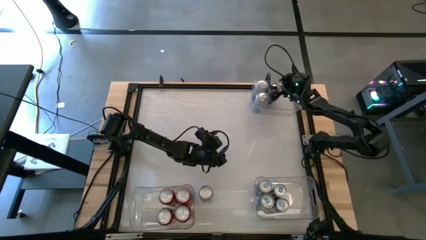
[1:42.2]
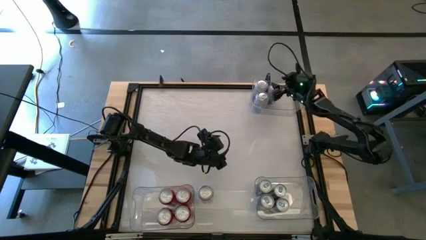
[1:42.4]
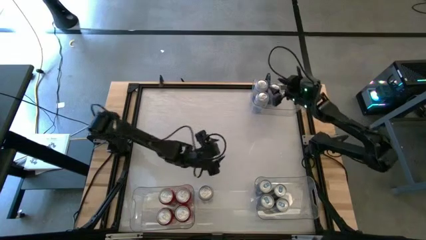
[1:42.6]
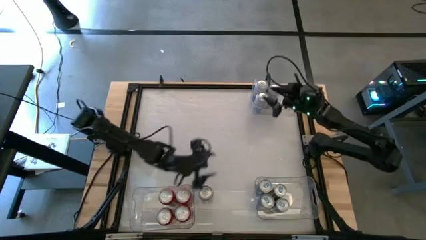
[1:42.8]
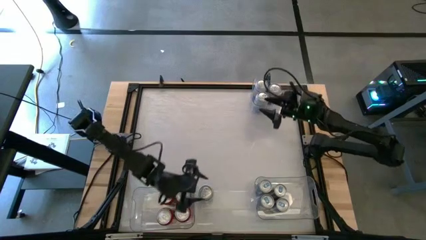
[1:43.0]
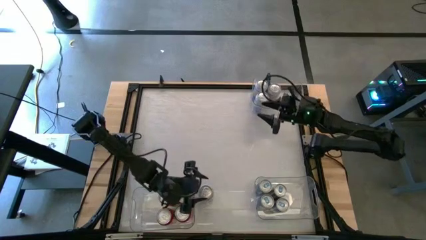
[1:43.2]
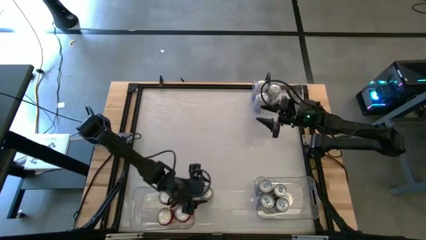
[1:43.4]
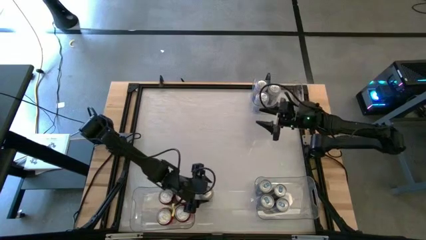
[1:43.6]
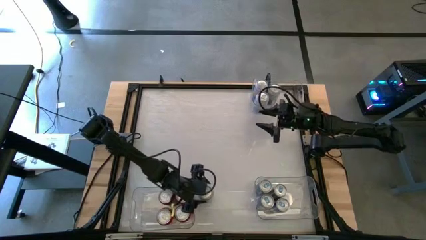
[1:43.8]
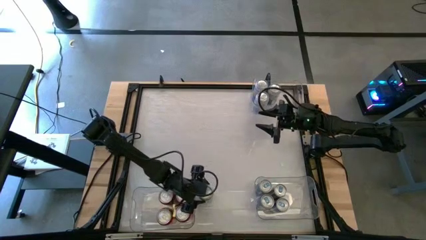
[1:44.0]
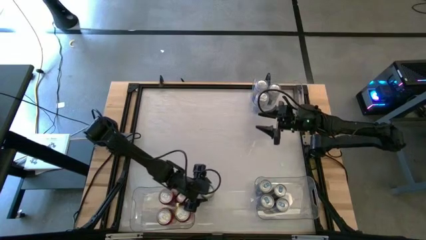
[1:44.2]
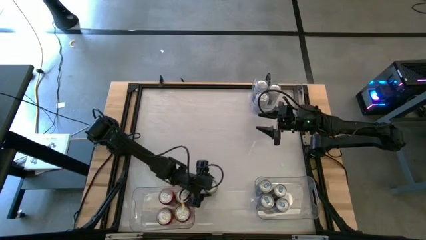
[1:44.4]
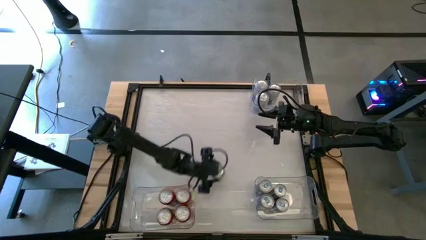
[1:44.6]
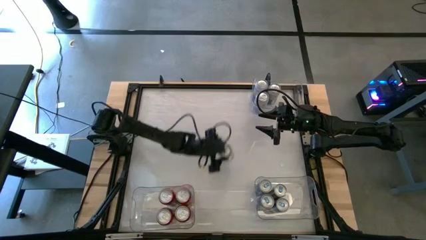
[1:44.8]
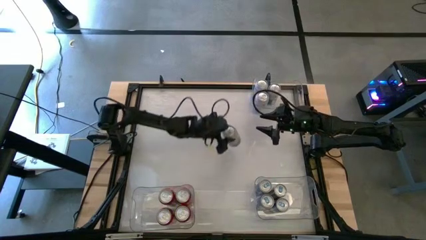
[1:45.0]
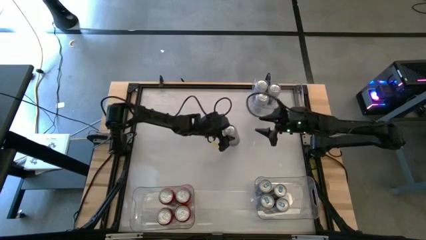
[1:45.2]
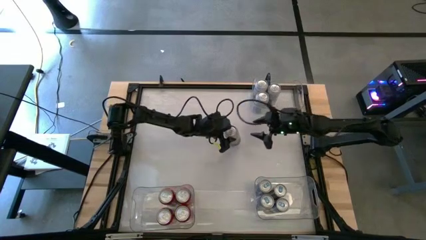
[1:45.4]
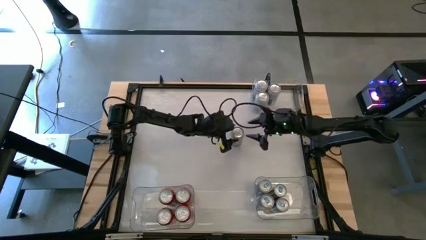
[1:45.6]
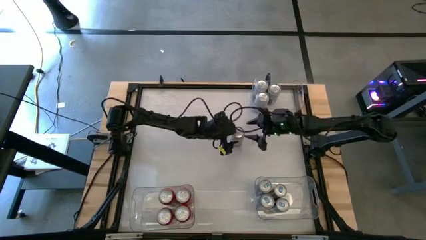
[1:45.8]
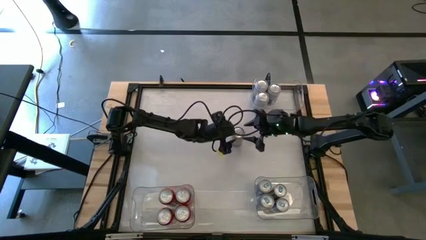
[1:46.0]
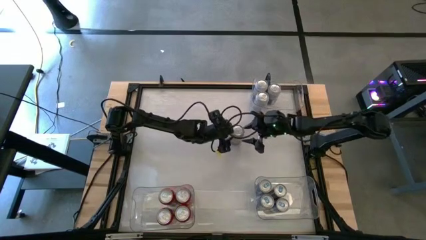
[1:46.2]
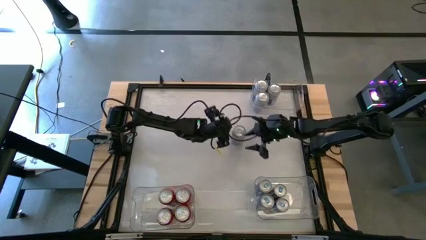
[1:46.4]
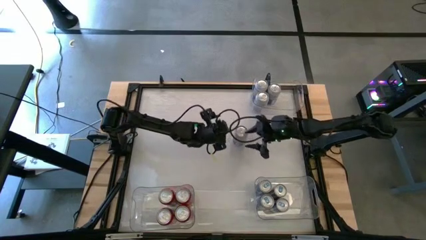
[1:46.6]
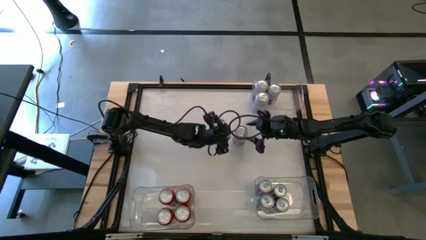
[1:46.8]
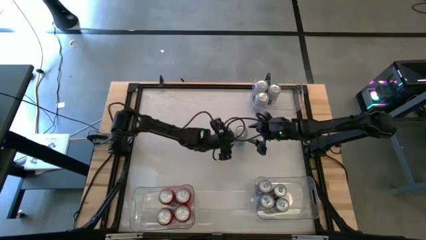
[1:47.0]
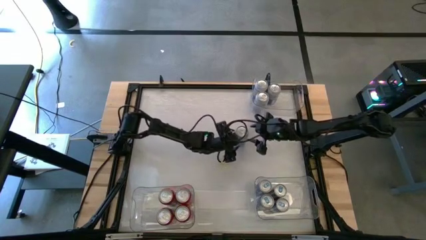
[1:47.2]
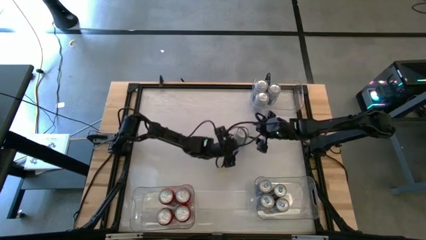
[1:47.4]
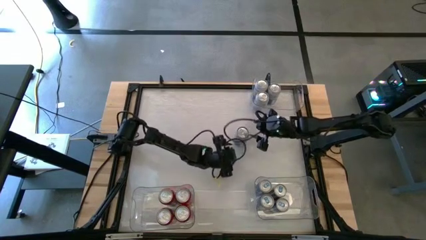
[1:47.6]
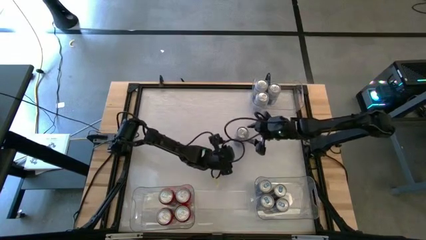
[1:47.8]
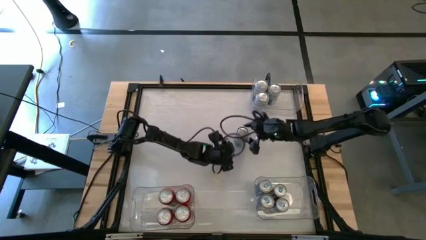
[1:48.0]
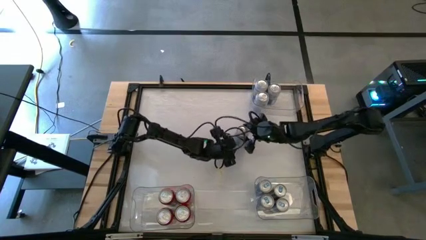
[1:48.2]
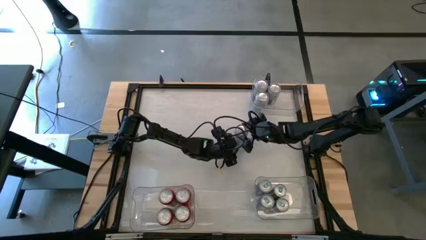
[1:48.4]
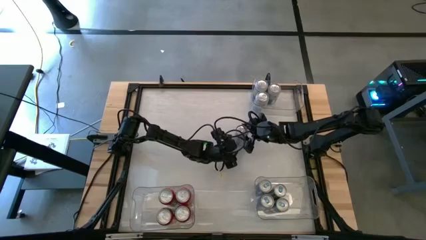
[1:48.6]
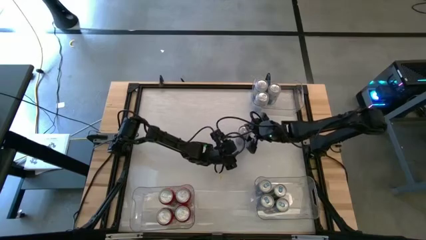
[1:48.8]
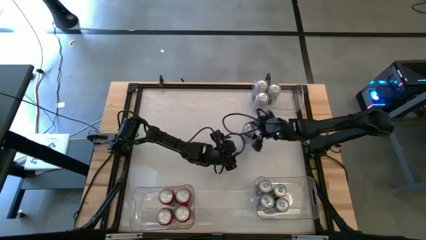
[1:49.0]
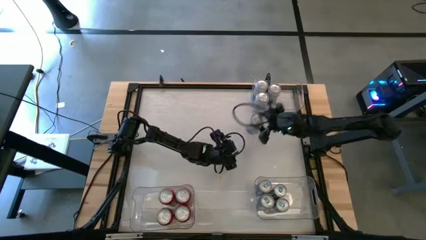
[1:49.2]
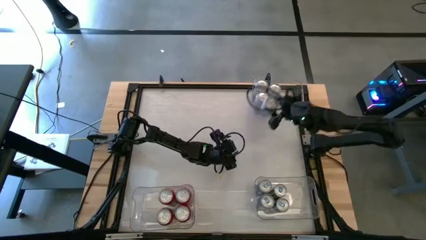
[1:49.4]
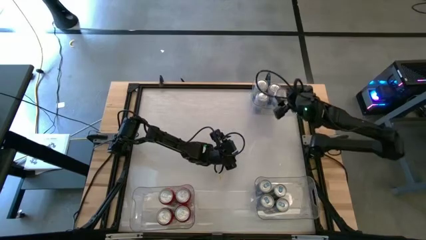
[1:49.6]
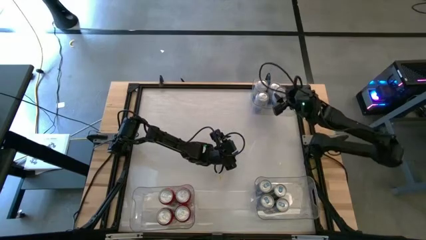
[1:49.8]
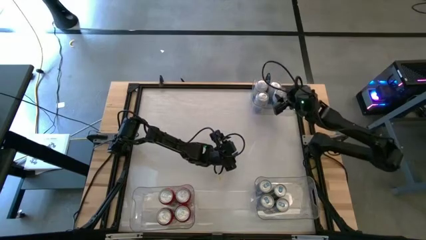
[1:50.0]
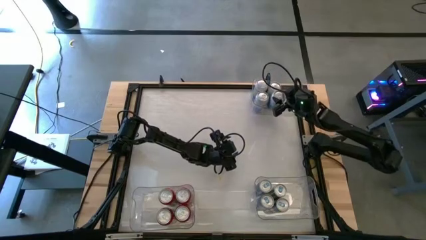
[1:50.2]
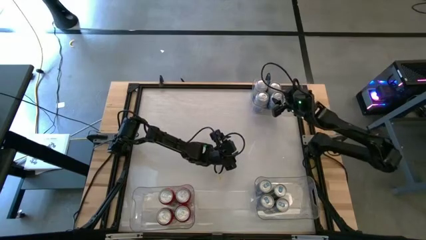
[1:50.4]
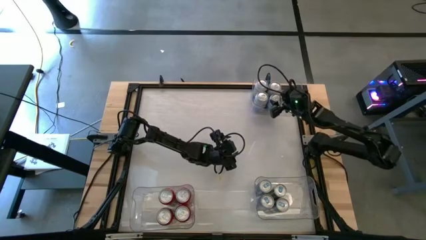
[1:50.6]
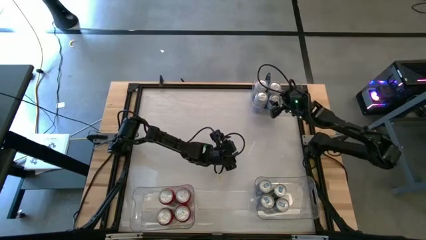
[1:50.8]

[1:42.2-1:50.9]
Task: Sort soda cans
Put the blue-white soda can into the top right transparent bin

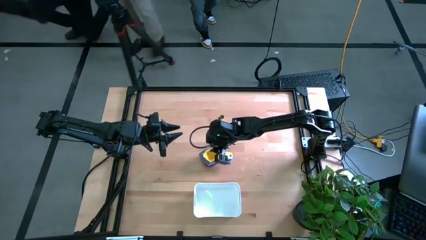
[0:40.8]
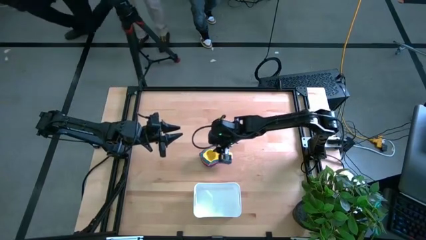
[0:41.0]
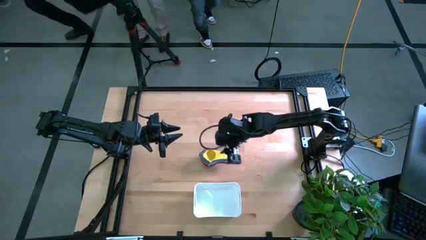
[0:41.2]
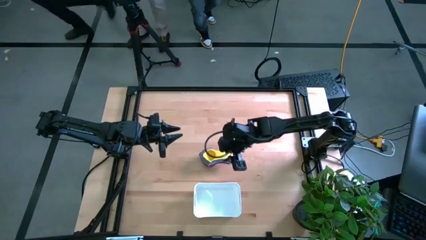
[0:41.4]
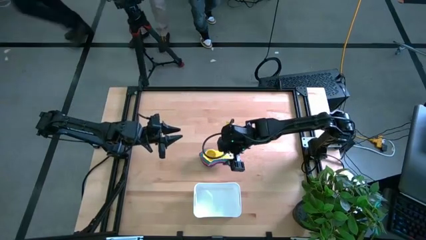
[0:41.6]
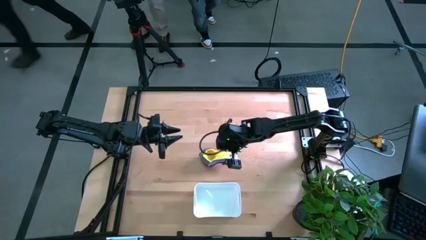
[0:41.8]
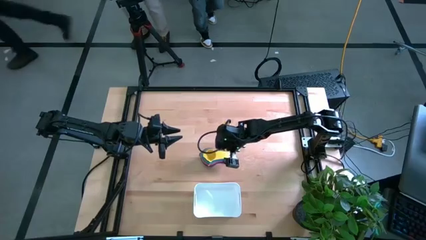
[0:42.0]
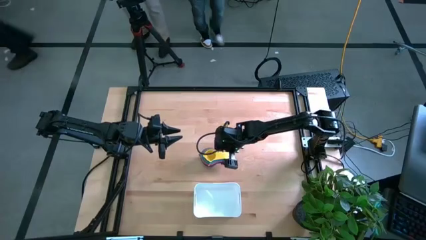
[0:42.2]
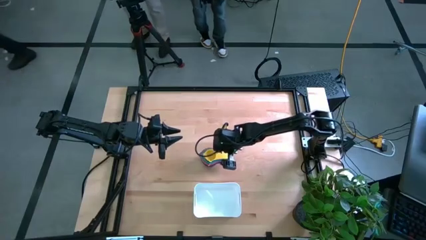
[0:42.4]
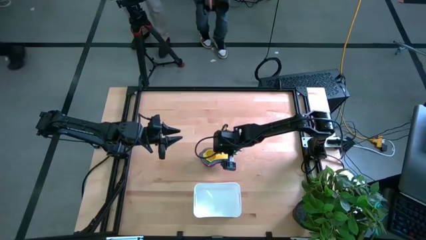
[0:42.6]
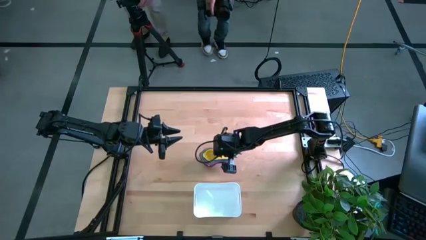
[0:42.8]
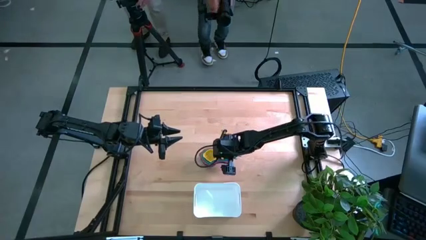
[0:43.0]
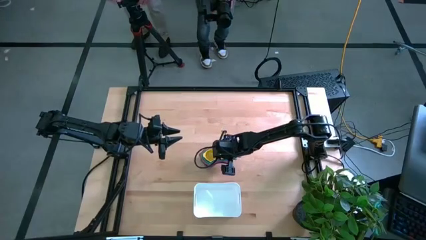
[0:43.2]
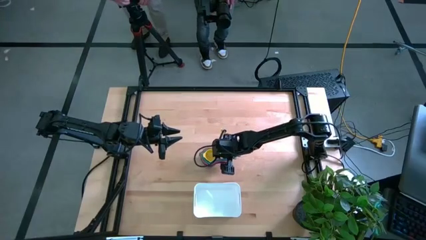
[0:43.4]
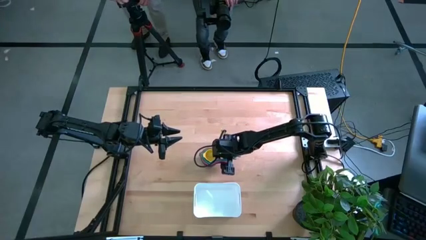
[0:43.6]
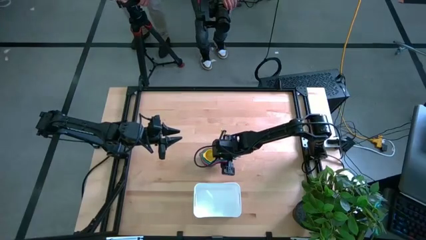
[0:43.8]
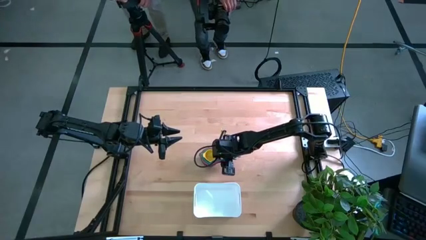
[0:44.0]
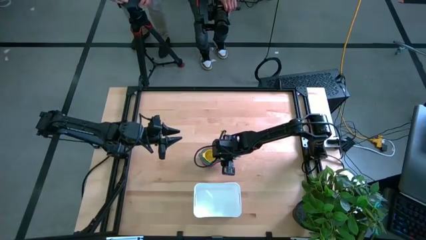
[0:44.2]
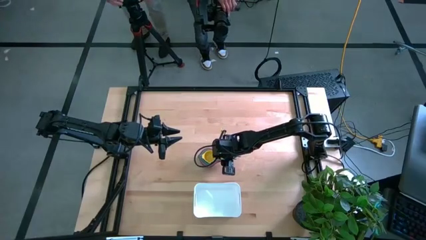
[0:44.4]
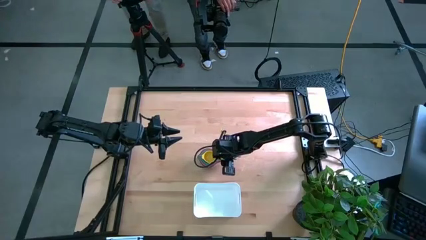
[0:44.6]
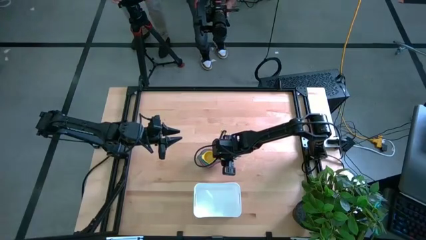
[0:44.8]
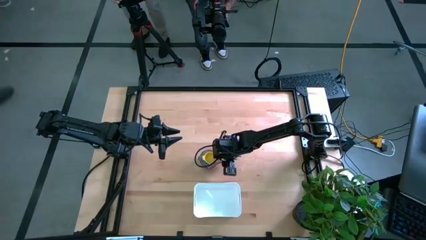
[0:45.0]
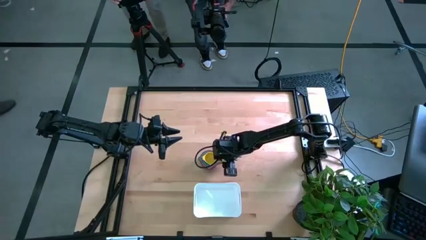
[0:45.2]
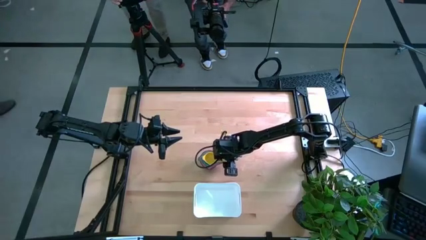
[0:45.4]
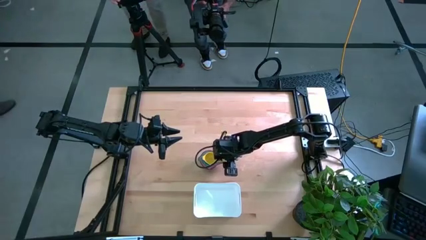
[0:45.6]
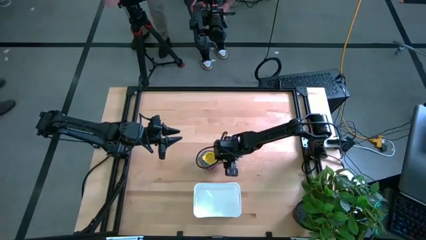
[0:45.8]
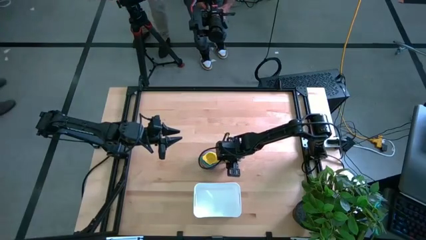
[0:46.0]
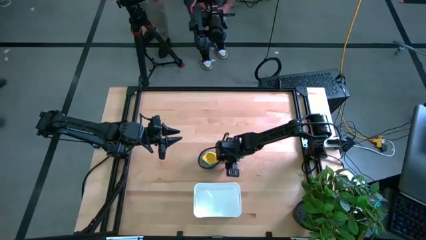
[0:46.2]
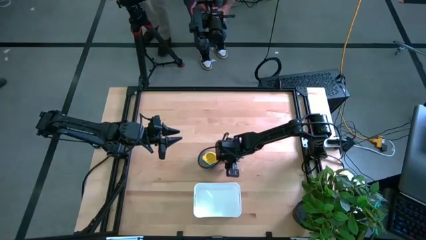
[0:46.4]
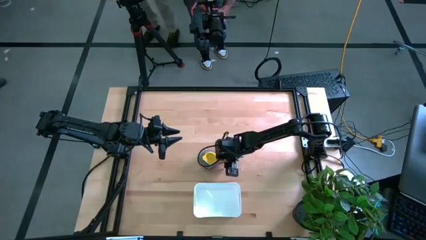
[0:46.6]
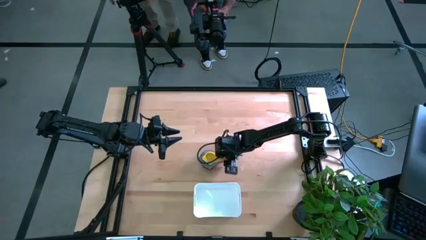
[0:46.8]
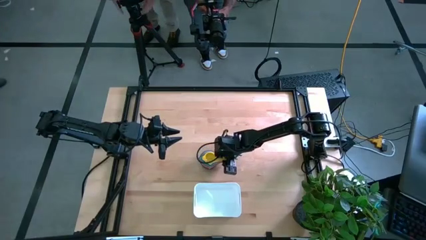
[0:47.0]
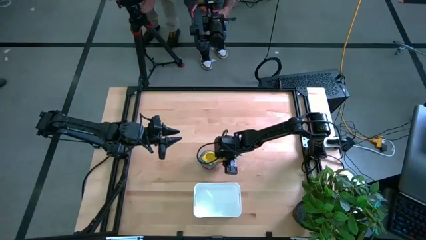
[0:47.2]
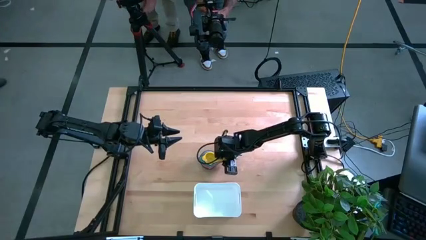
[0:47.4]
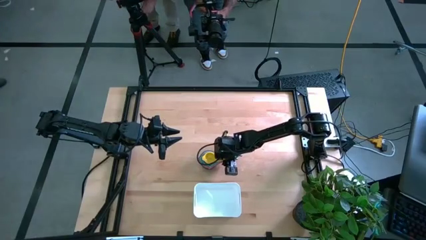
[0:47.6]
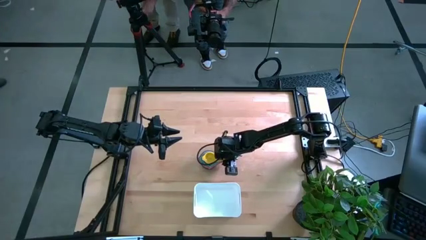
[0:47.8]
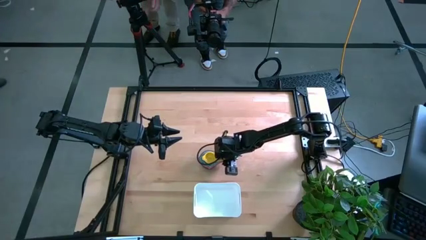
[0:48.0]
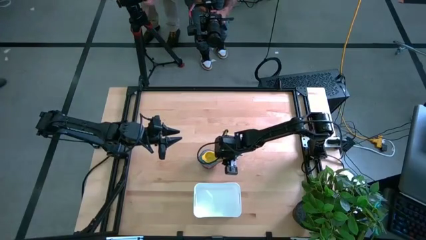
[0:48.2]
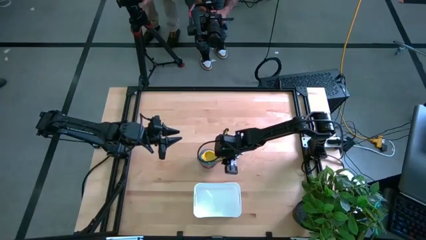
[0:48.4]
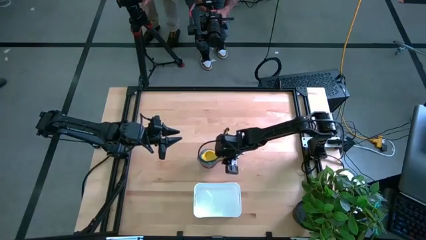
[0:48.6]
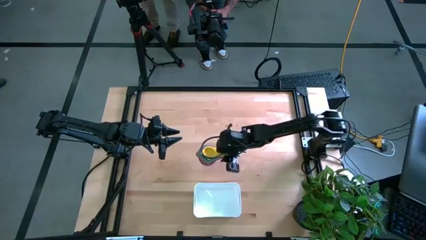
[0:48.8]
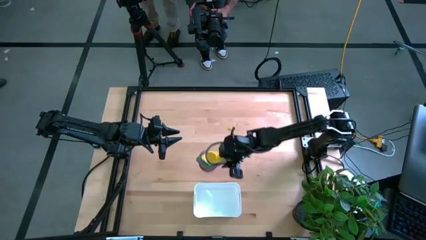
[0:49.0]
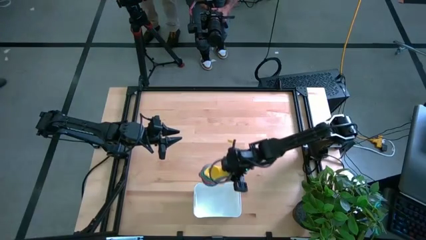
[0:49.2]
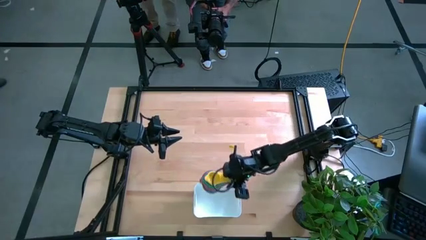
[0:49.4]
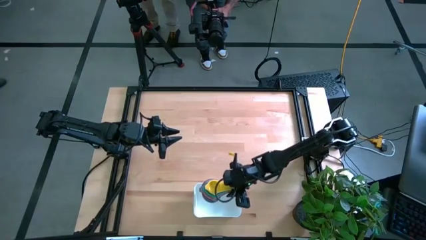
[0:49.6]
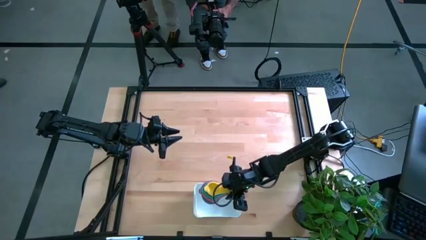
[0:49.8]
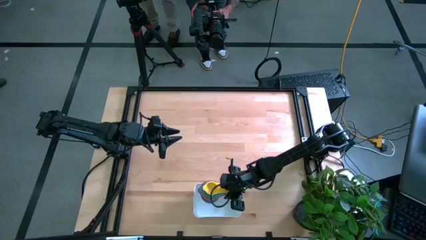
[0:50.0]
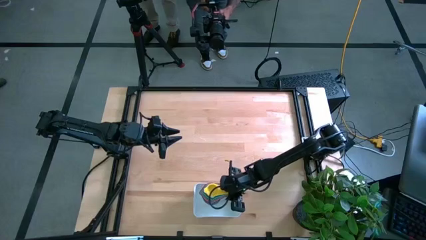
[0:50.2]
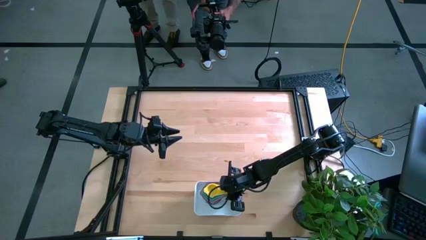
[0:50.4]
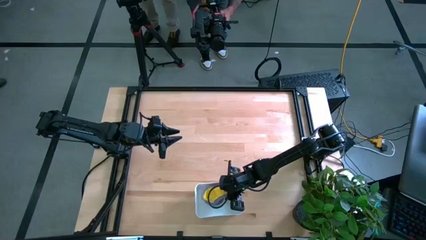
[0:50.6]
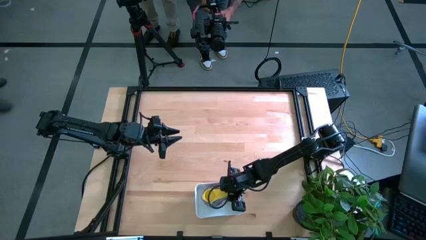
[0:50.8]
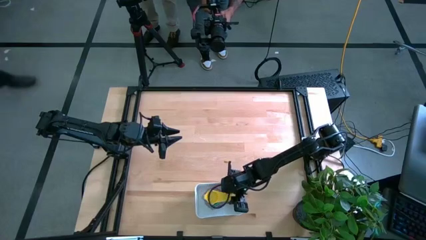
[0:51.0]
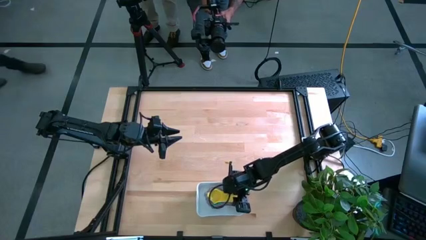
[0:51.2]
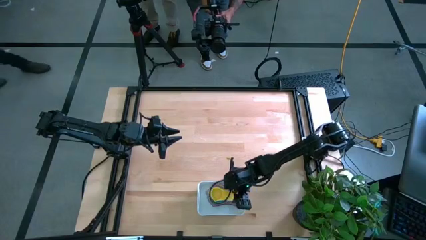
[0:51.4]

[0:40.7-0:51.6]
Task: Nest measuring cups in basket
Put the stacked measuring cups into the white bin
